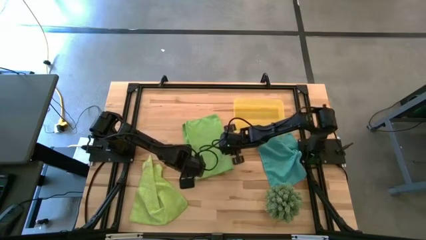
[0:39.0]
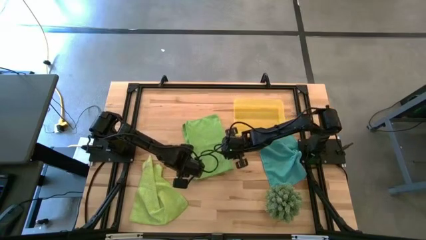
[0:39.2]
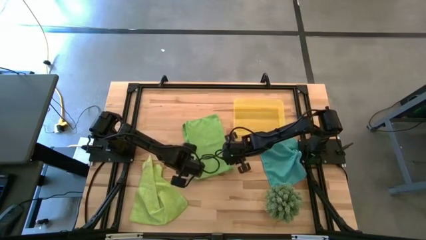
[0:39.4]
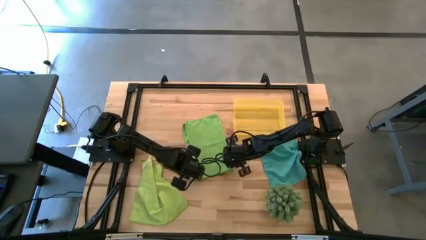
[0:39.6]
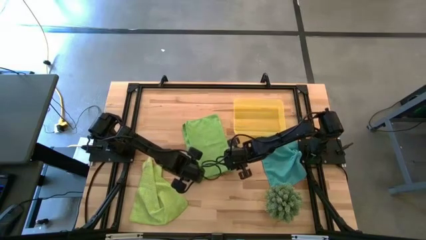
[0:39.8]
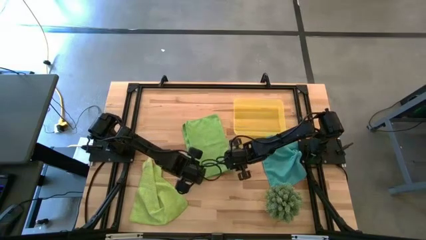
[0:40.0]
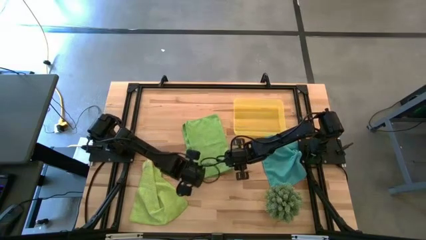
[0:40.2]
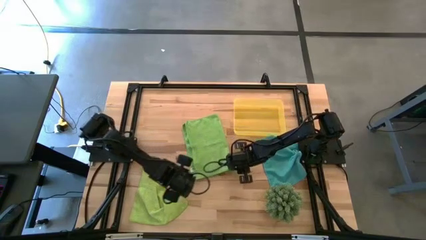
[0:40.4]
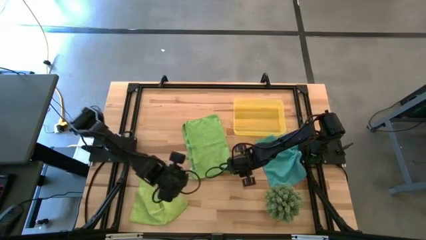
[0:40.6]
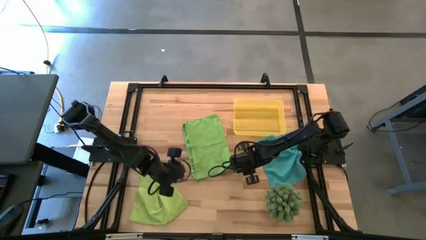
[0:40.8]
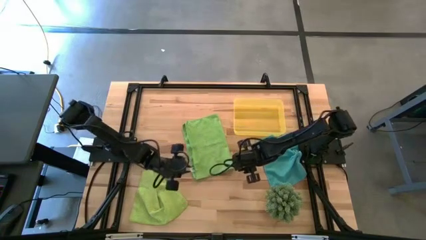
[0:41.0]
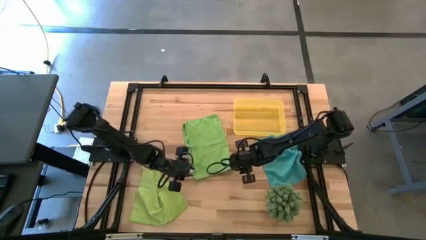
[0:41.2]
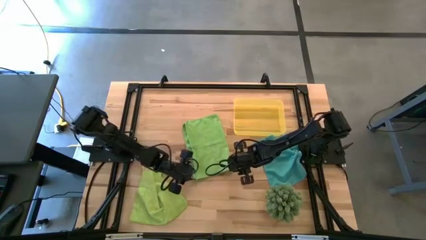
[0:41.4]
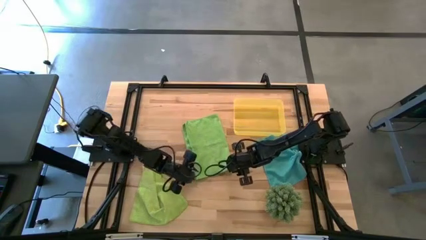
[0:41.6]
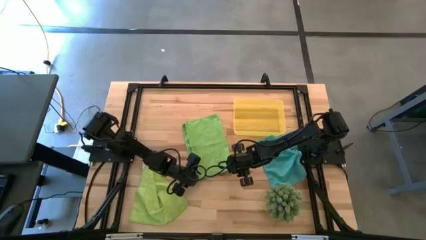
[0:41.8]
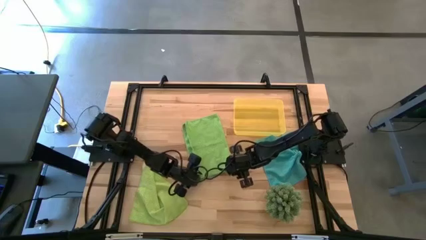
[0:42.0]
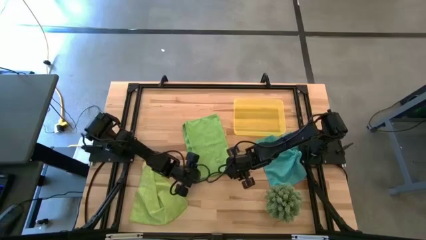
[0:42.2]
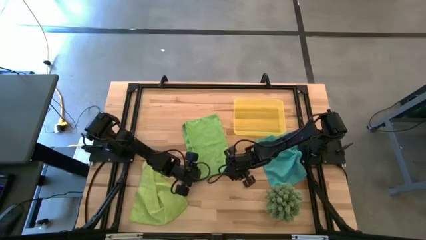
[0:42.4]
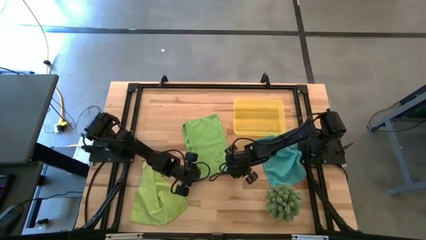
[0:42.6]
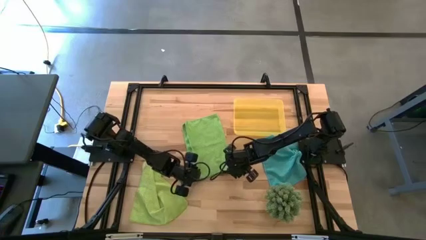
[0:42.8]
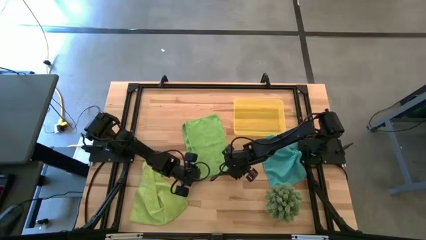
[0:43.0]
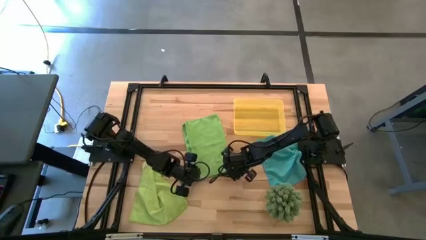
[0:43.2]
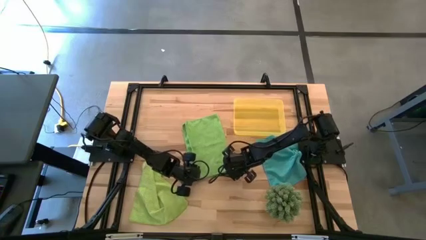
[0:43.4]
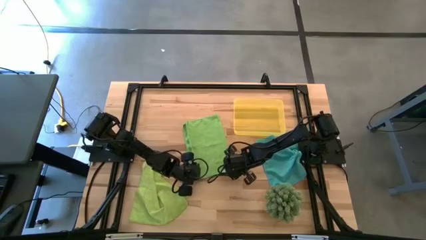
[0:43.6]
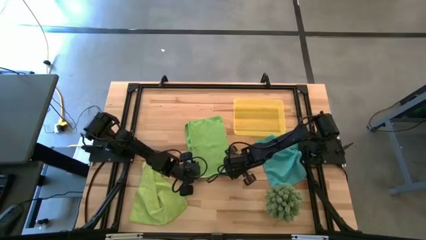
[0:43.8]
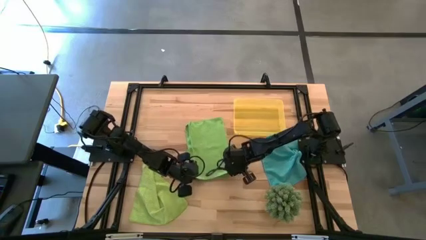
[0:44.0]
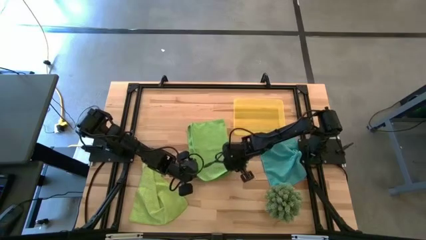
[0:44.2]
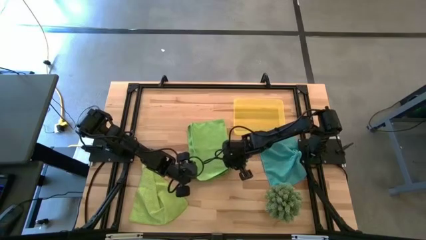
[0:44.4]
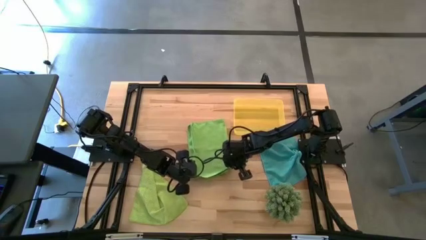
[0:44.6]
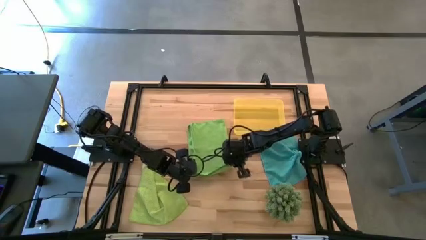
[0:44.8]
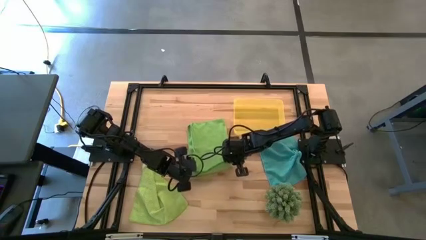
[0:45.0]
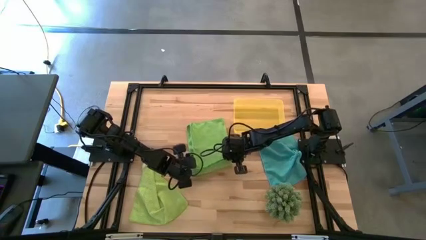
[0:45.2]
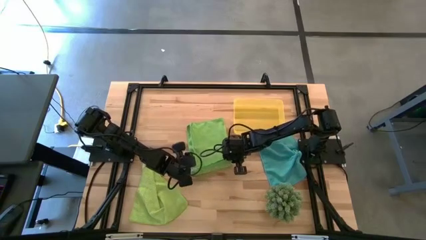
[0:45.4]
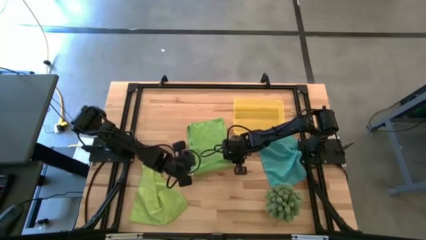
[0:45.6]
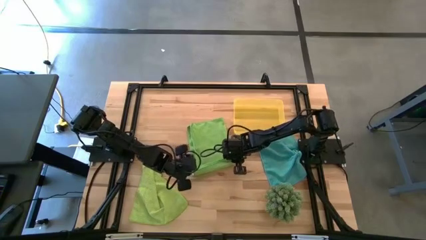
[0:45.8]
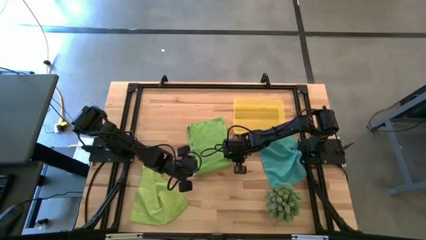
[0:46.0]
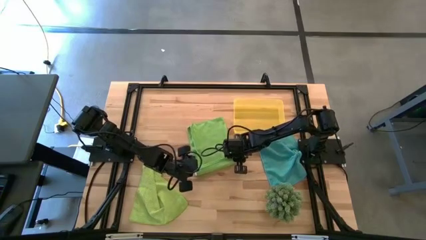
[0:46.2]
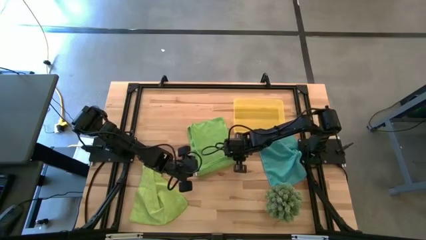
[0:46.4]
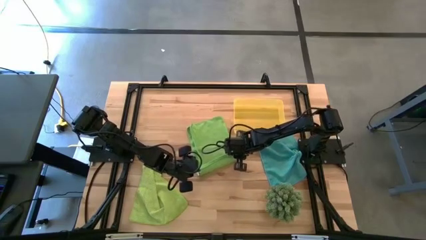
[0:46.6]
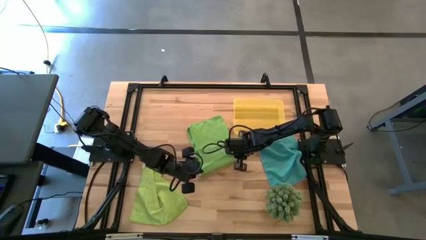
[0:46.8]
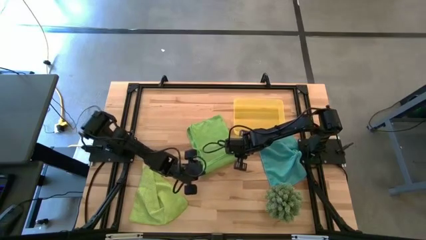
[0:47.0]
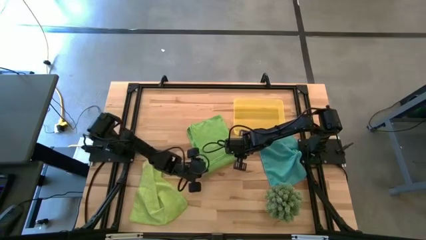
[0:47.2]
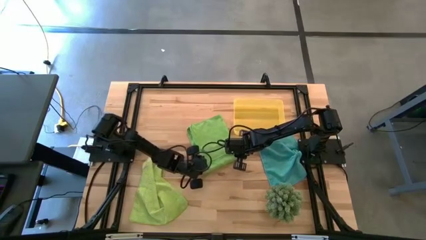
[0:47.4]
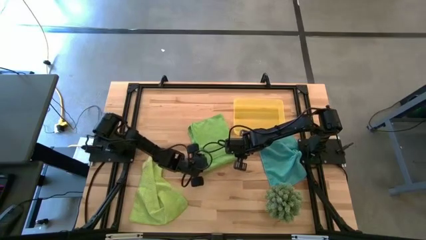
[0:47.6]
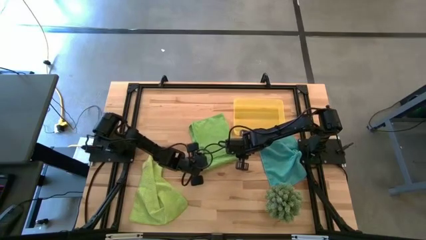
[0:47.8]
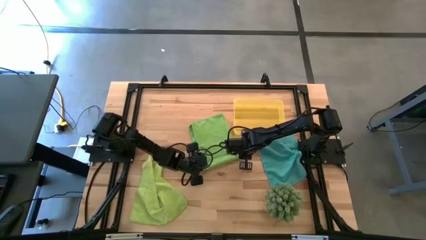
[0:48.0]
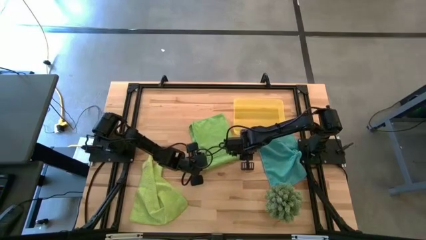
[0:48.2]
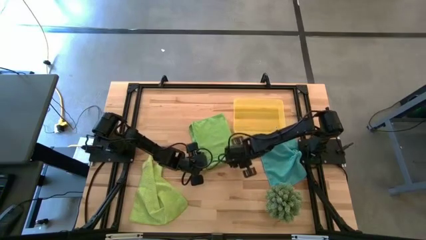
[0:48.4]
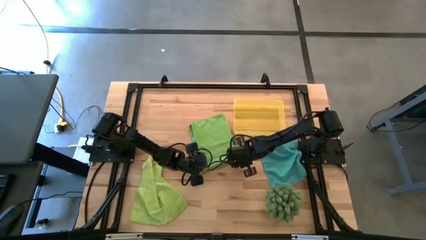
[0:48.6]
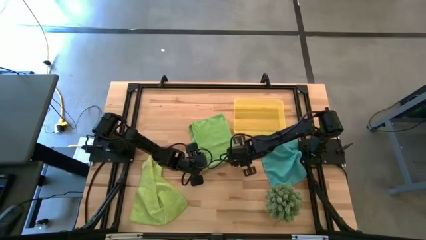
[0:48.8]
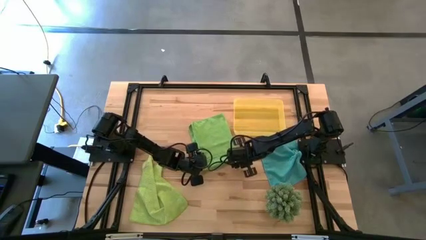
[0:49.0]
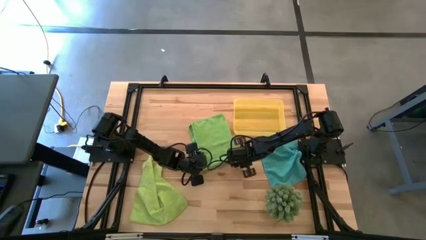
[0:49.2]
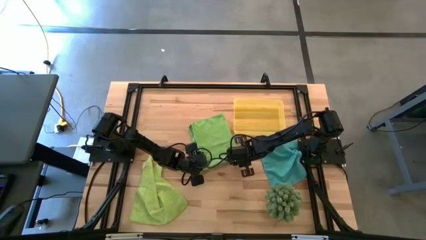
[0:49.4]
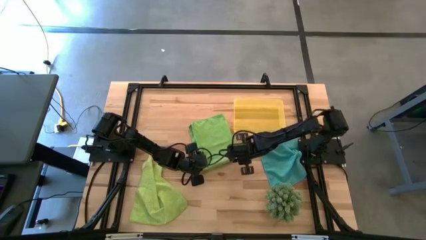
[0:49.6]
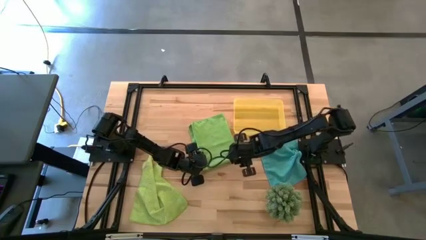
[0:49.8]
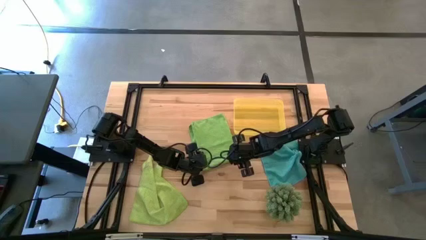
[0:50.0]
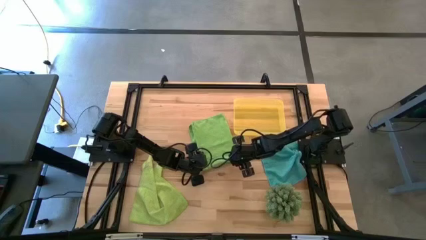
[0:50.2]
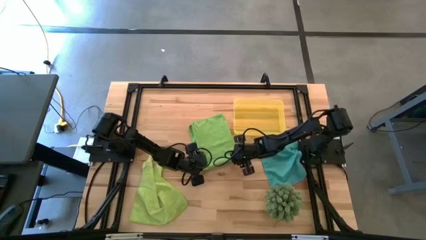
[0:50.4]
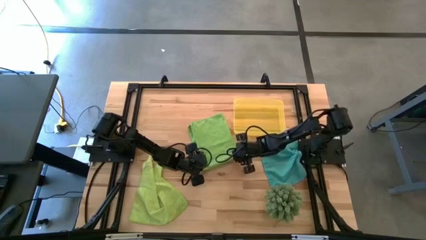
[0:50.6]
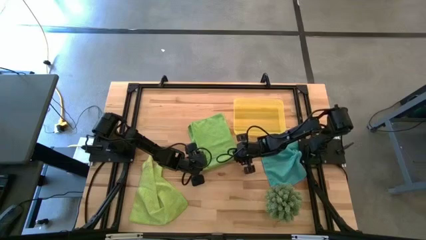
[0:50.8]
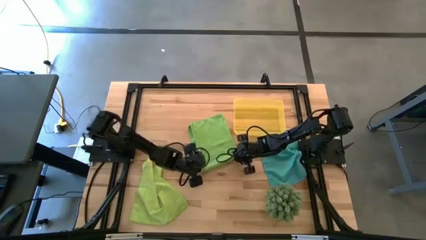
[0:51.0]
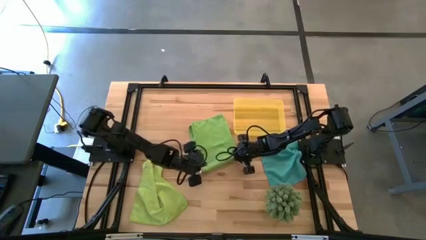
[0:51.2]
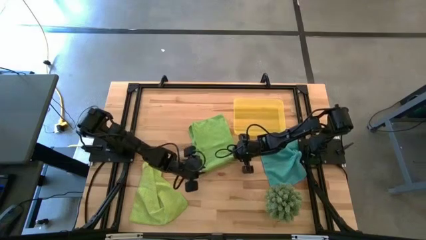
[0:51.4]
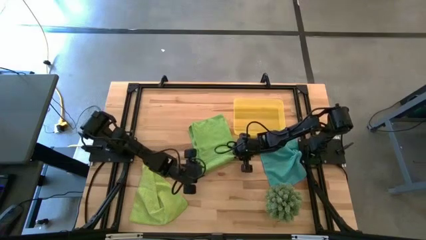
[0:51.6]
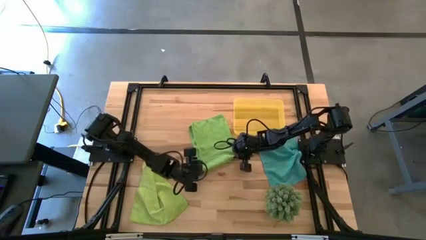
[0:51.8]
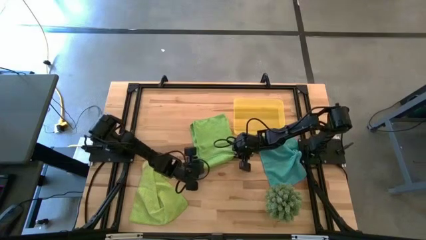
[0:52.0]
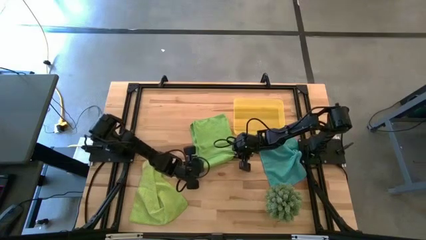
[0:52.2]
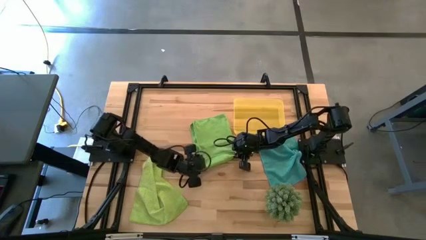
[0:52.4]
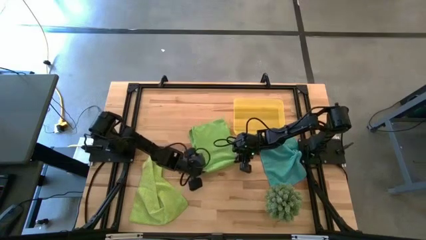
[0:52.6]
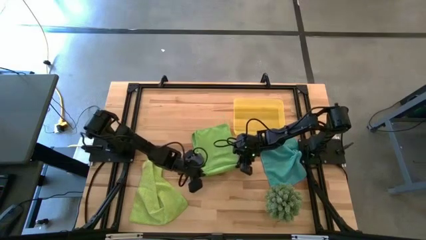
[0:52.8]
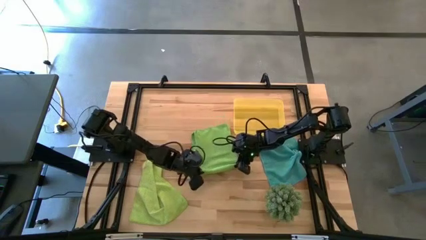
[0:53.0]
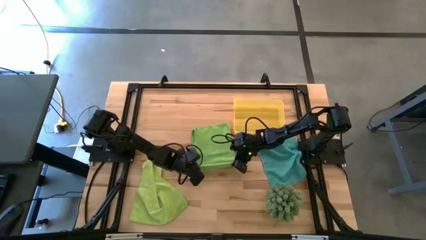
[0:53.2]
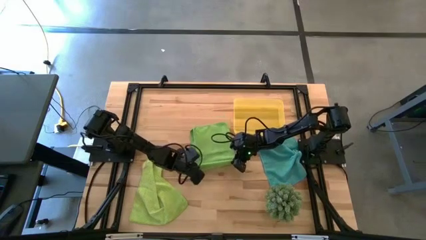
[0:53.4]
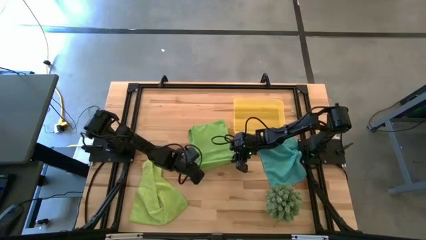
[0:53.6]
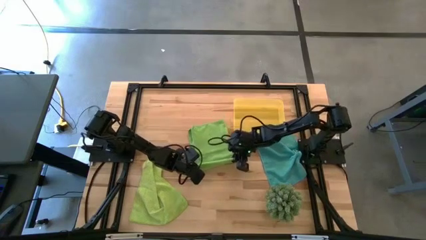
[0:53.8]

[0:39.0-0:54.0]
Task: Roll microfiber towels into tight, uniform cylinder then place into a basket
Roll the top green microfiber towel

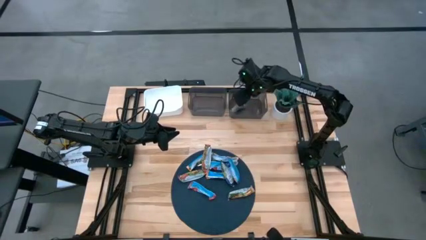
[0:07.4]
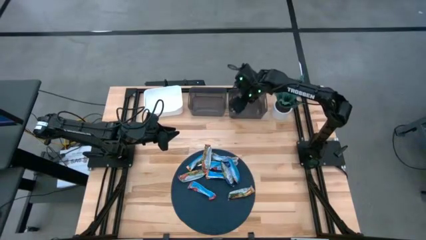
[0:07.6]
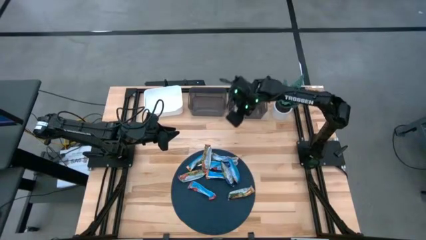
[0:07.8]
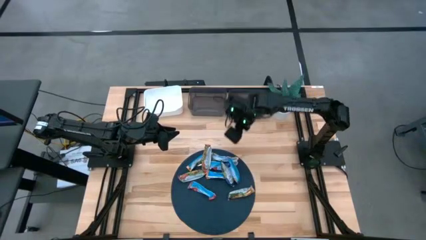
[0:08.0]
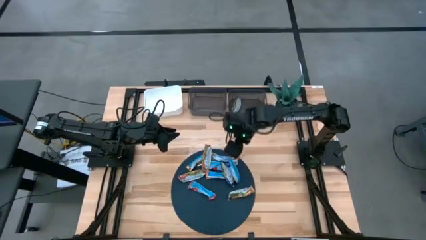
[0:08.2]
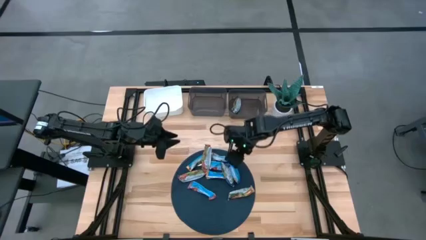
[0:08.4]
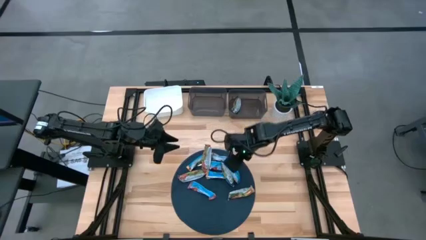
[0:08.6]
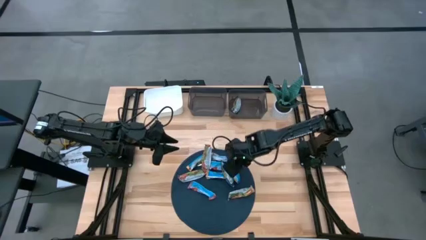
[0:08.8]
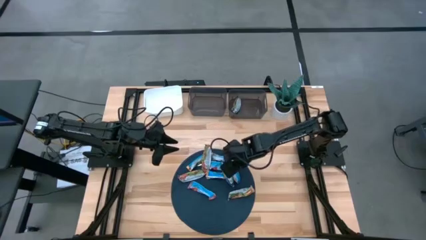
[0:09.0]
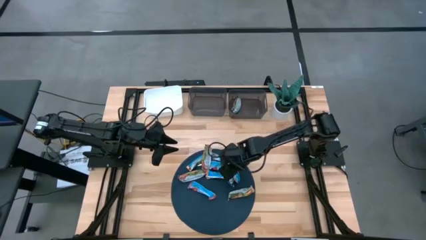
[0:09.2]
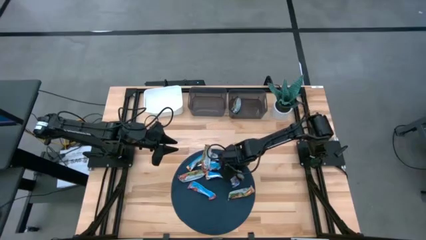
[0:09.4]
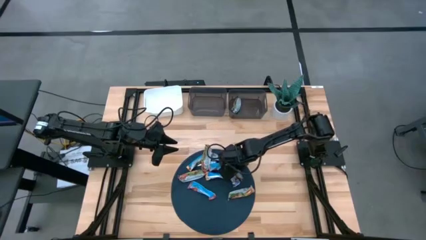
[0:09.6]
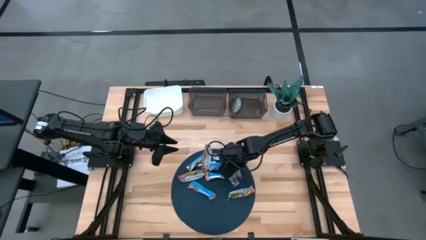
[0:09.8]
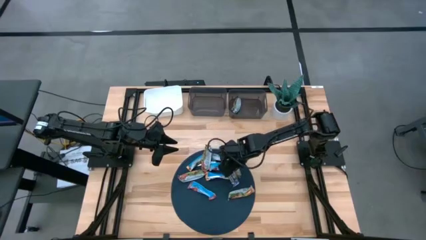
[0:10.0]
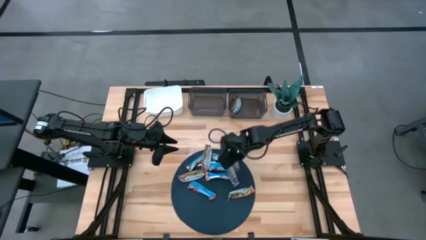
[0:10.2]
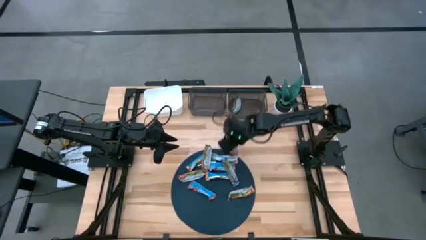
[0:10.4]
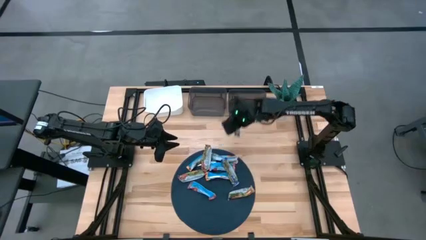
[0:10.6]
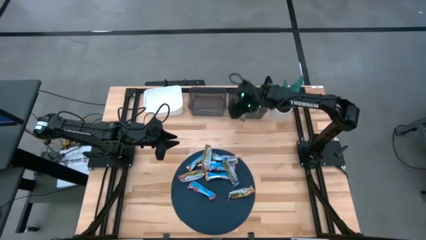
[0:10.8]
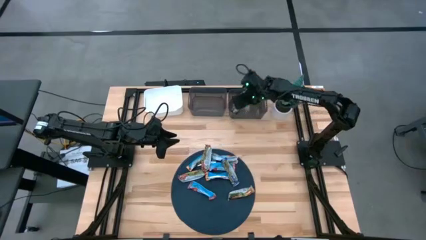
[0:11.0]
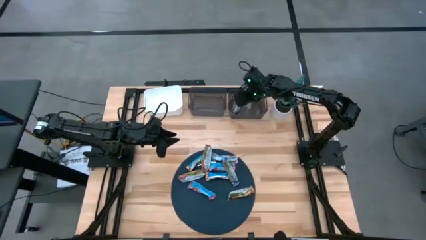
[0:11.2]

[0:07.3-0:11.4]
Task: Pick and place Granola Bars by type
Put the blue granola bar into the right black transparent bin
